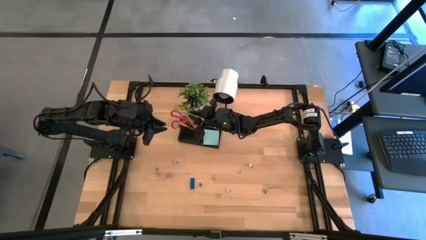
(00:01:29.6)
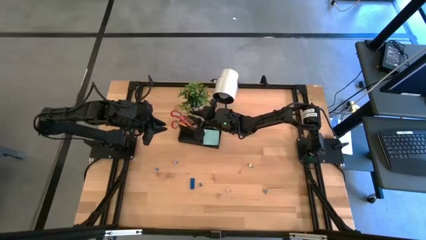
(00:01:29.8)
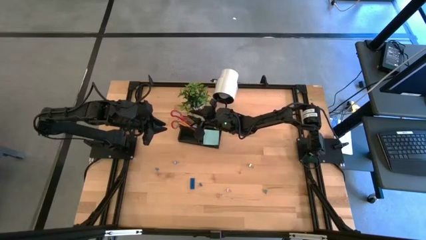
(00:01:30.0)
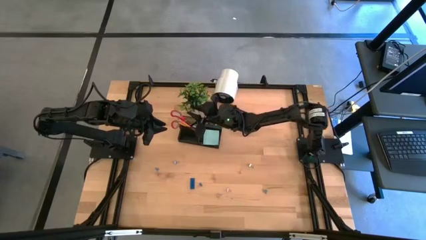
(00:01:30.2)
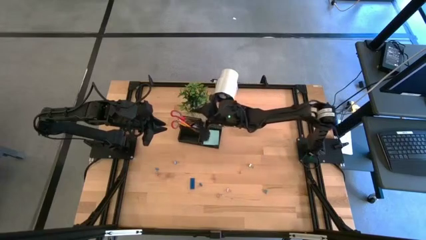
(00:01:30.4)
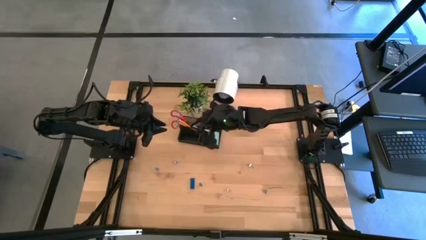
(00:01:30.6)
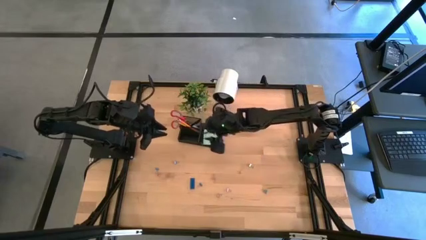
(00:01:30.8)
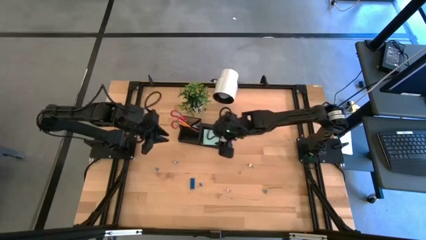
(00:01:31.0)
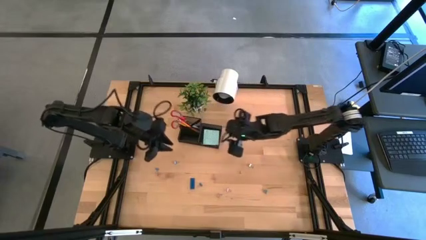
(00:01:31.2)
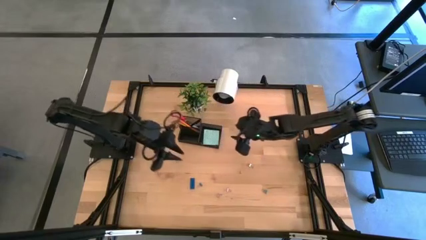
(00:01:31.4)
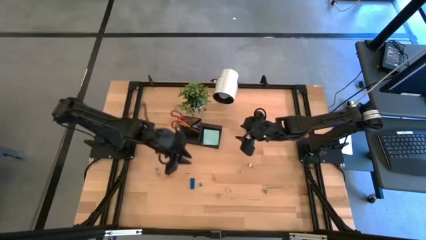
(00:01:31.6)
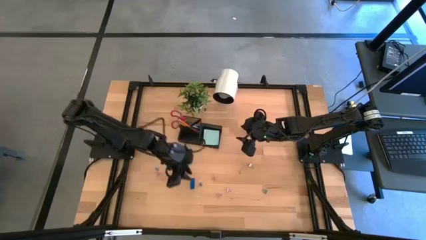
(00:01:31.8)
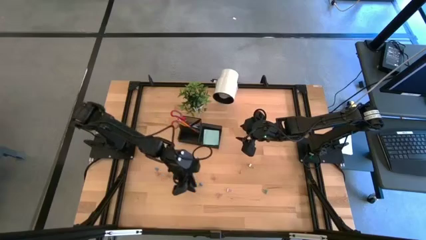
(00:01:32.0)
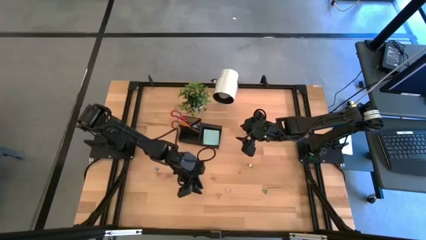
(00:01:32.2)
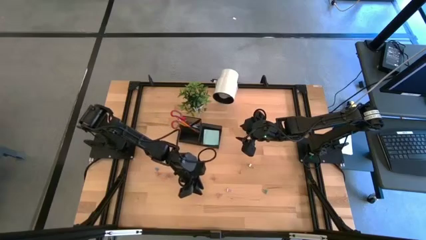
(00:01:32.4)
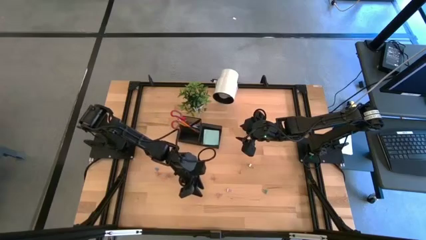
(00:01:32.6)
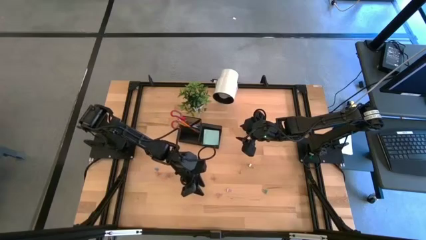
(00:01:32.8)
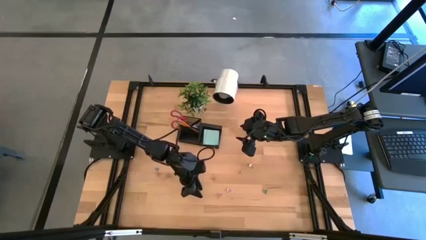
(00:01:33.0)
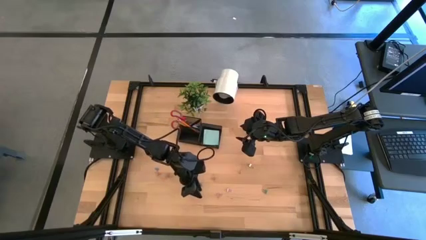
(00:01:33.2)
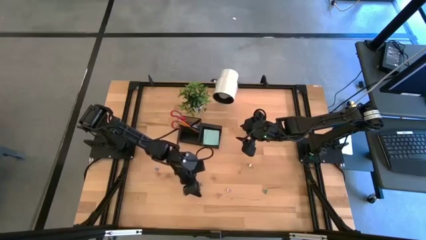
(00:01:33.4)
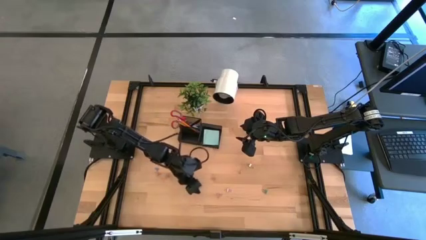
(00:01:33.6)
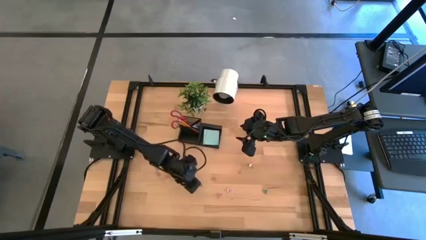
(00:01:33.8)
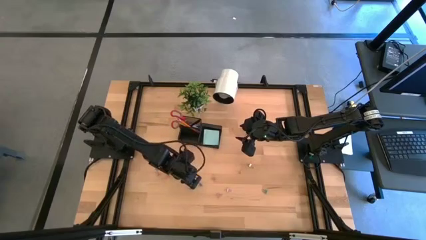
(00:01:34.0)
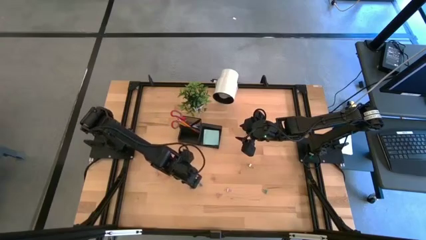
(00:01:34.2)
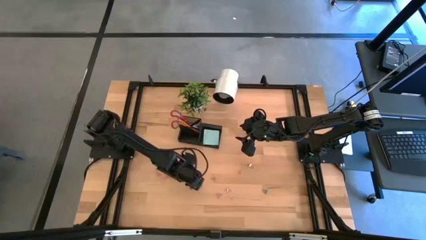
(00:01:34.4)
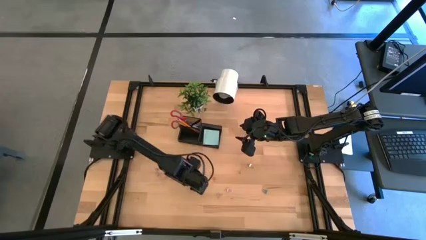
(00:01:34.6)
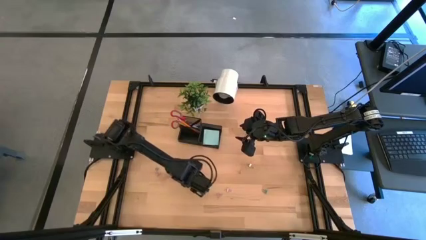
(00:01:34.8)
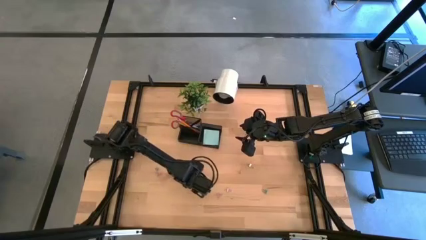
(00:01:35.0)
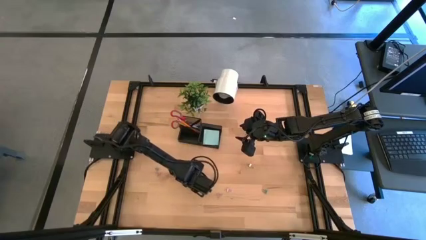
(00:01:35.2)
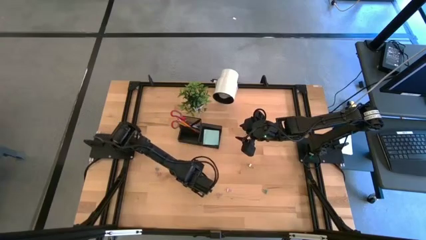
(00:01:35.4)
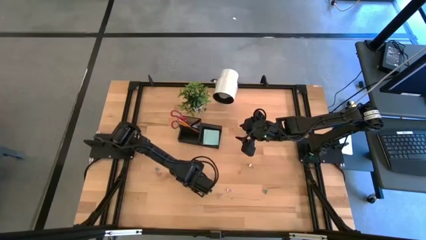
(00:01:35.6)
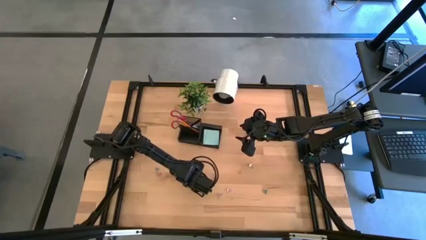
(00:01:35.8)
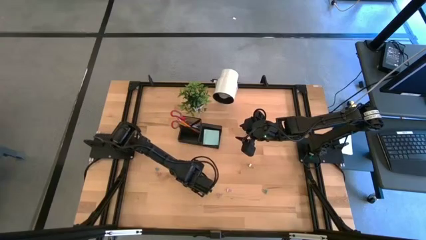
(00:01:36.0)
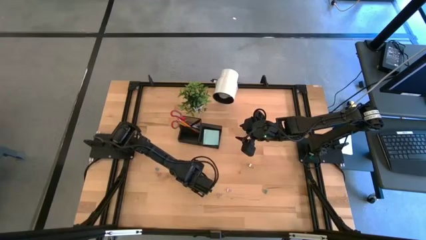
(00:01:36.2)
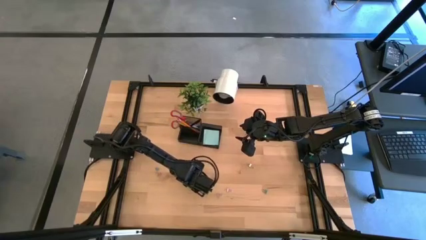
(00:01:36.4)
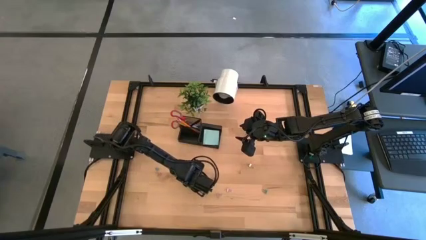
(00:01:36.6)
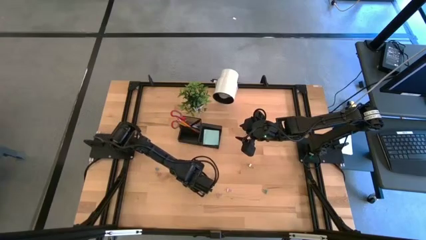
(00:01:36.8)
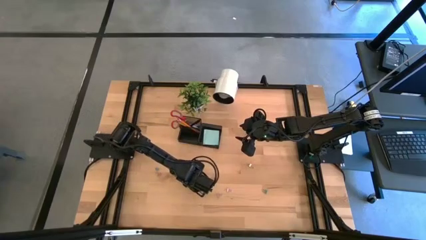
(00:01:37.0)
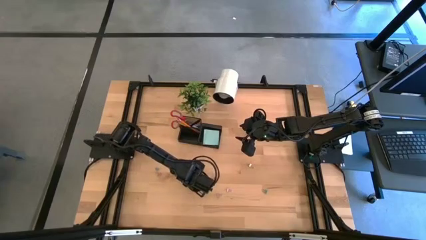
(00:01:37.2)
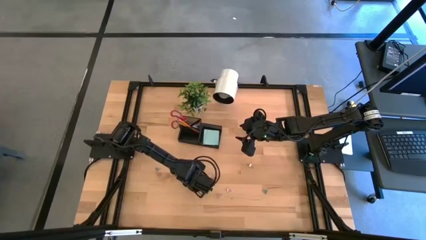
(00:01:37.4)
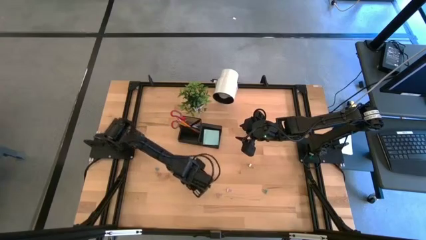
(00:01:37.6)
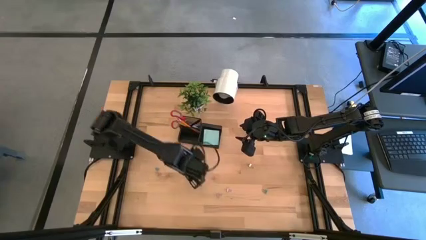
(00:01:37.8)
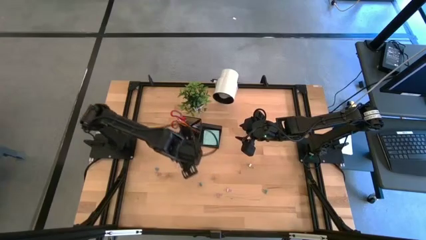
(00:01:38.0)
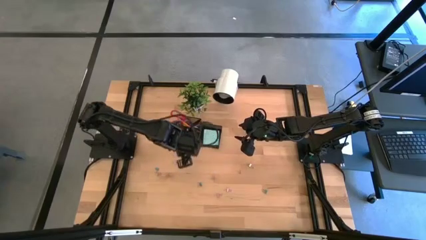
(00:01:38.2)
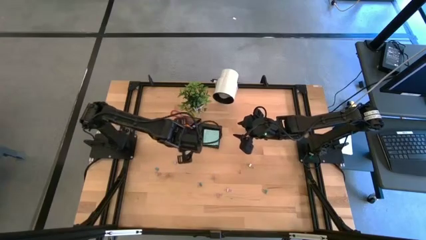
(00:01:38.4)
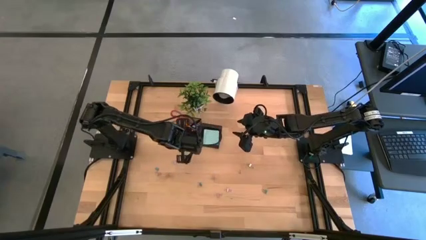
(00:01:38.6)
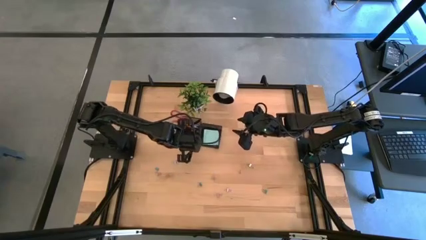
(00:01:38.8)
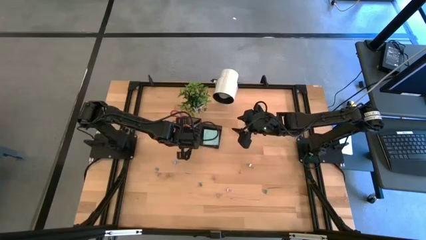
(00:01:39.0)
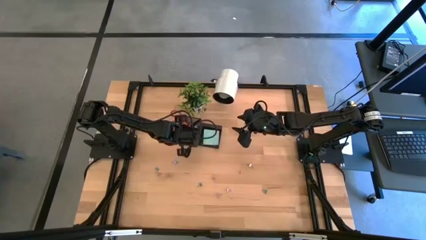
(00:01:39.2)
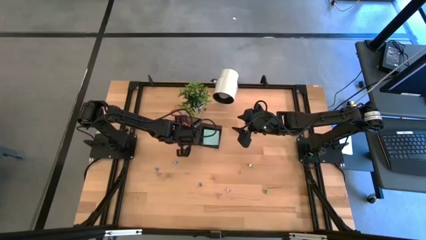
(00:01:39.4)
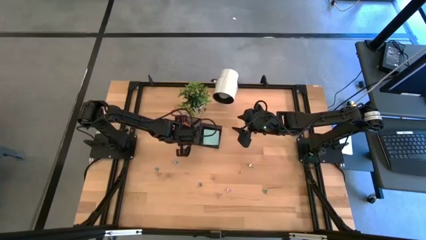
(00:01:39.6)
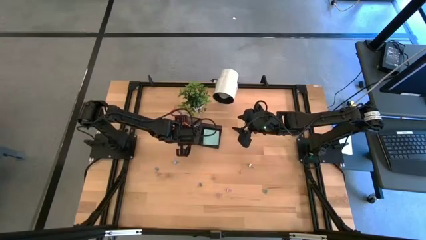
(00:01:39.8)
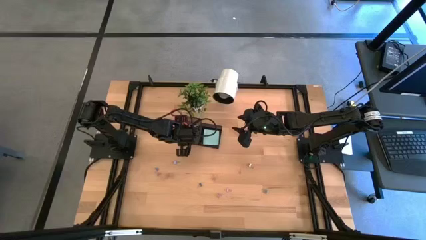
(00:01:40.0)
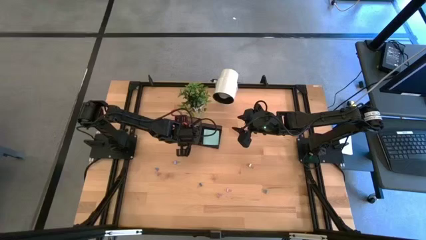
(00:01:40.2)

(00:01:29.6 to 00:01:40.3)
Task: Pick and place office supplies into organizer
Put the blue eraser into the black desk organizer

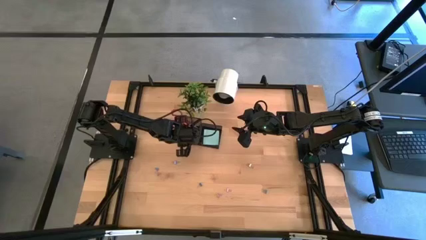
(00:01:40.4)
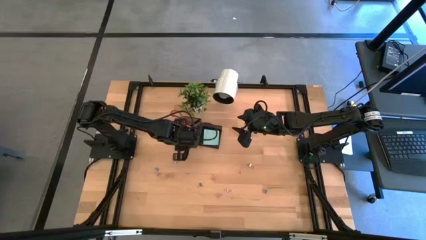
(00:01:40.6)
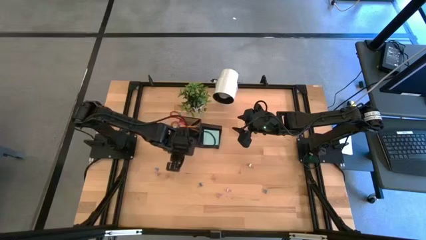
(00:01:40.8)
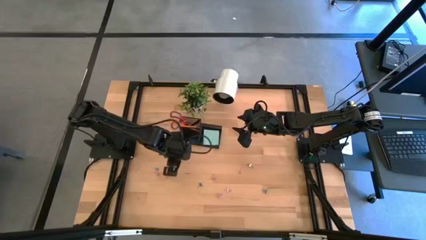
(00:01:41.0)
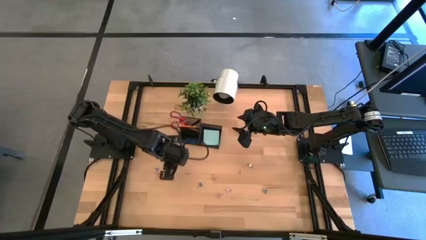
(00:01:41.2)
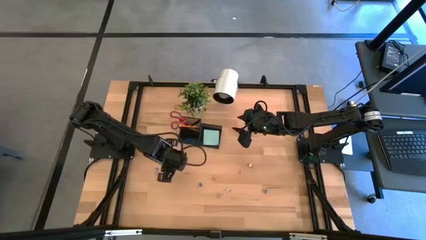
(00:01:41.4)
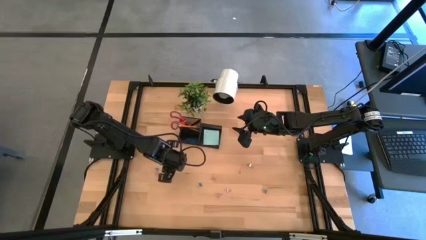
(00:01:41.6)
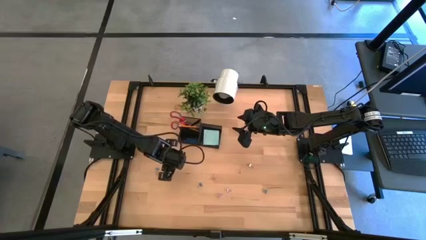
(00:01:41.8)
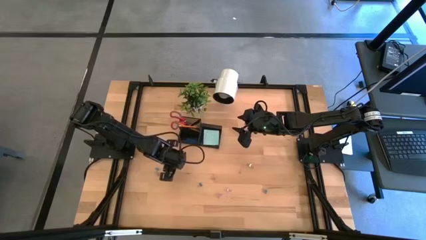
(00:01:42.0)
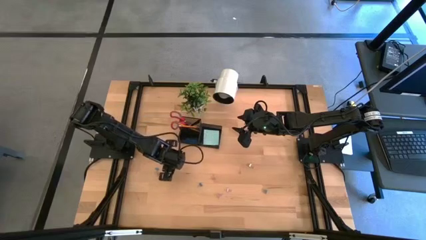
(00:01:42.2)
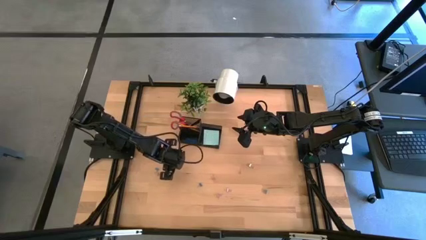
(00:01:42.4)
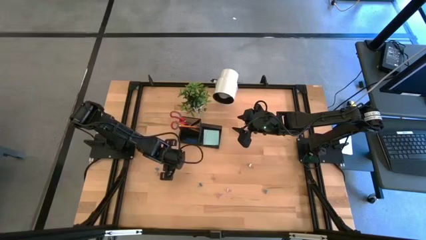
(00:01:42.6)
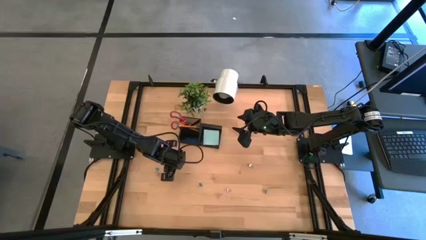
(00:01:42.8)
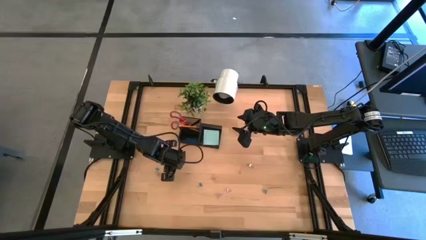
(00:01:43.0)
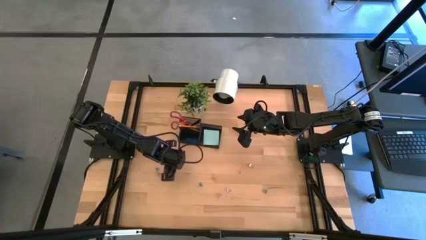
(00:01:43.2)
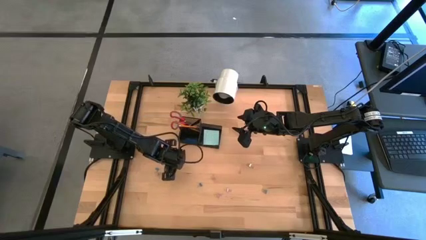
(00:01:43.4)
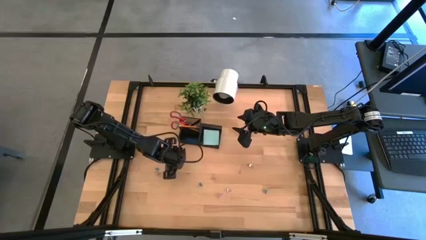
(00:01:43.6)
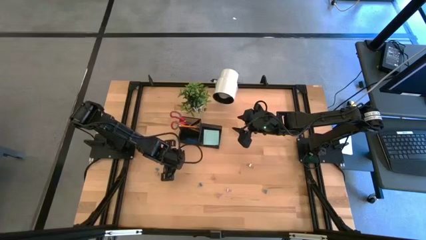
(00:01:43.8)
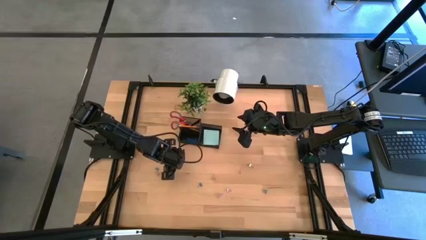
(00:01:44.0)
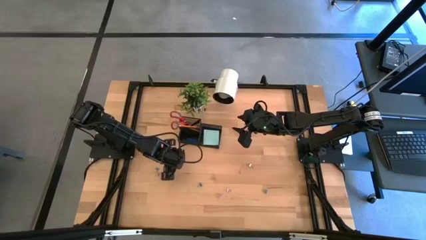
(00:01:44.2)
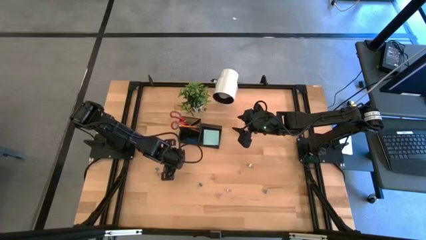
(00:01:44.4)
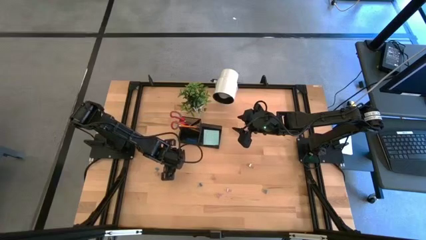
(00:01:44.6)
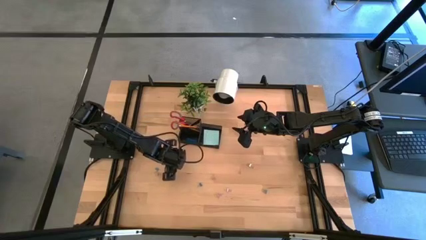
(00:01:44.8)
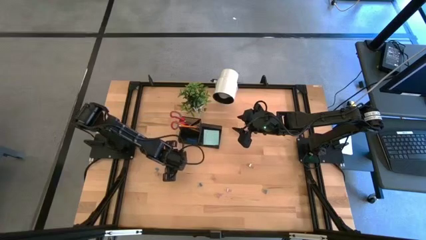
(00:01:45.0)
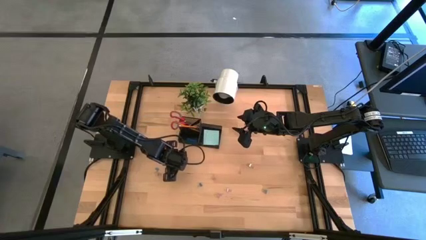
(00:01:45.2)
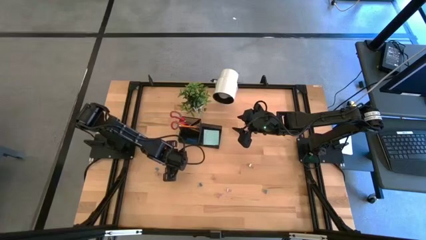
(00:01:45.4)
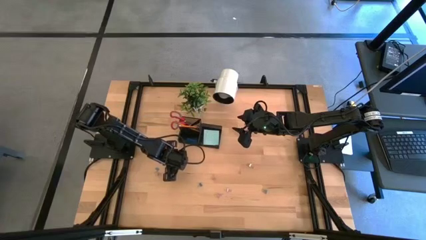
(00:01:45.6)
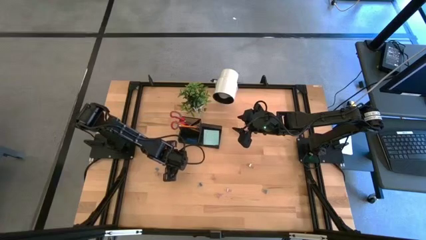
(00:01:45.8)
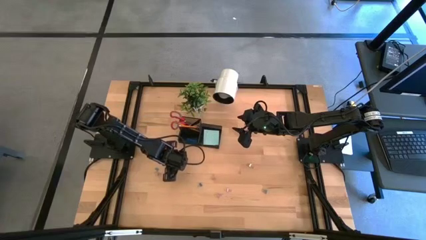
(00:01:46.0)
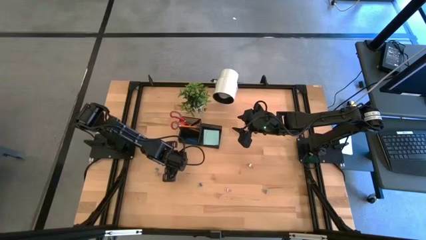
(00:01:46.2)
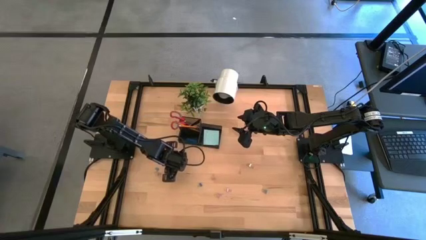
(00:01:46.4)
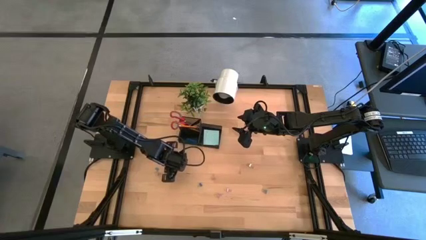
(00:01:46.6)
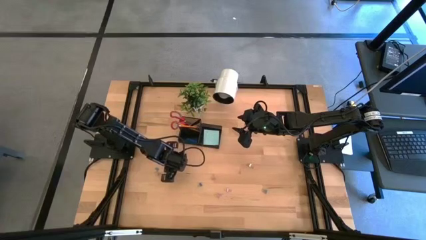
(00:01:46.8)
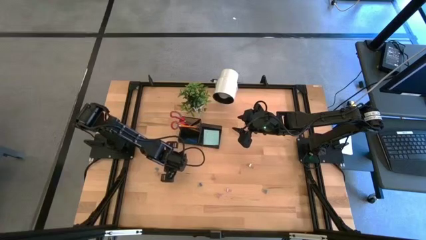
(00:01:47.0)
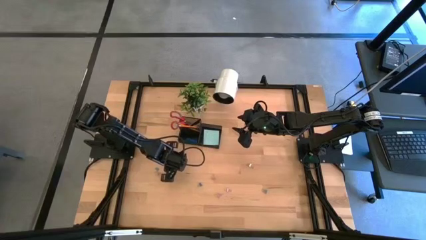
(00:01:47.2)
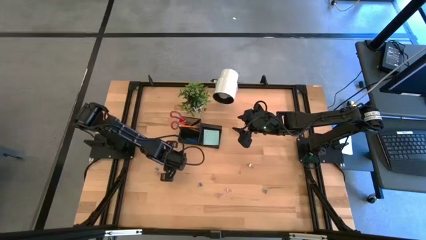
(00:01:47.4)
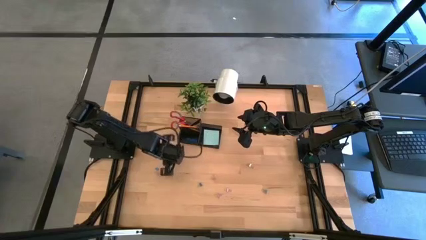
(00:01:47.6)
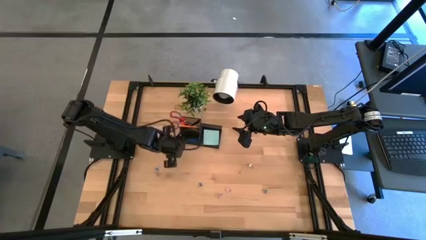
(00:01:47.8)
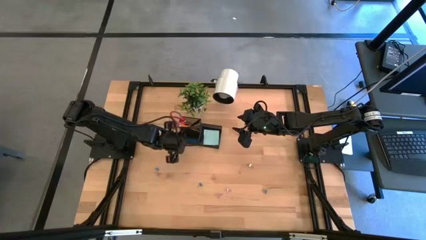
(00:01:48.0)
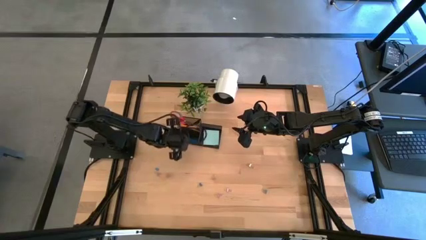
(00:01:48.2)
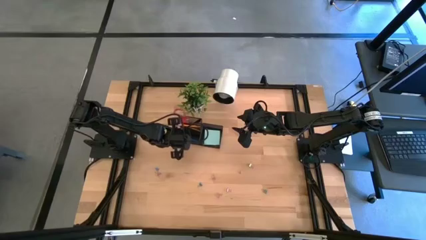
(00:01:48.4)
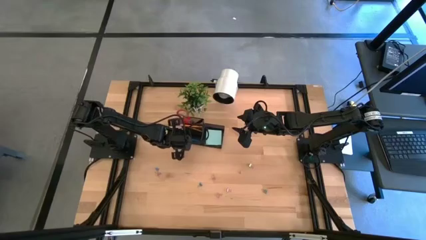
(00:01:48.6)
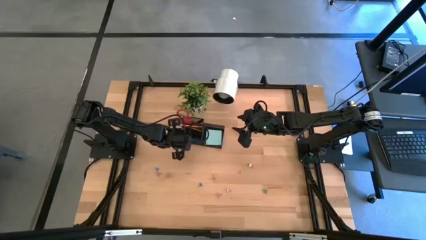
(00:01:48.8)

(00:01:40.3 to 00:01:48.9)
Put the blue binder clip into the black desk organizer
